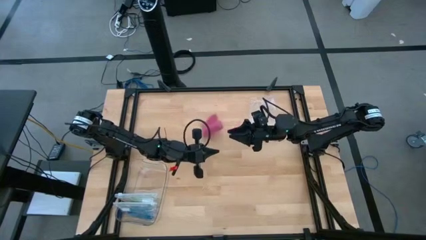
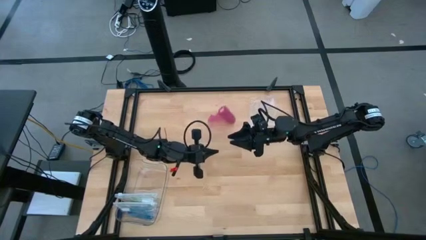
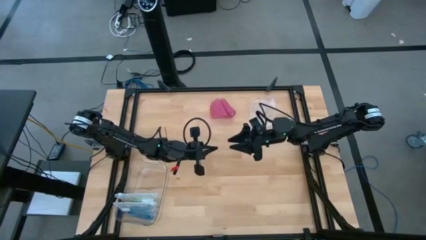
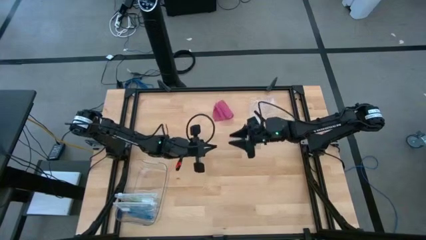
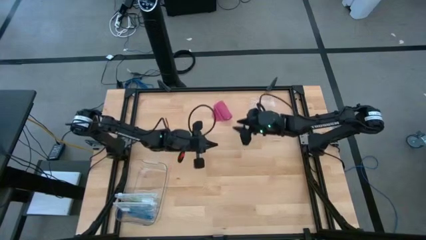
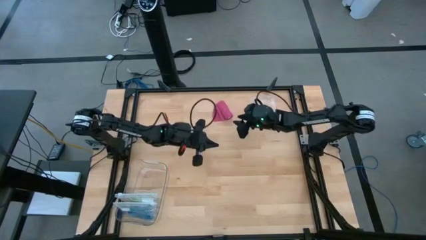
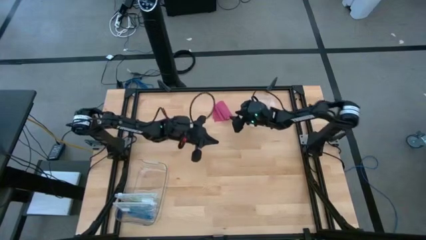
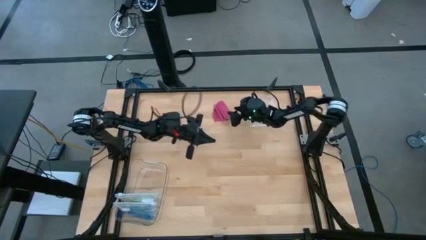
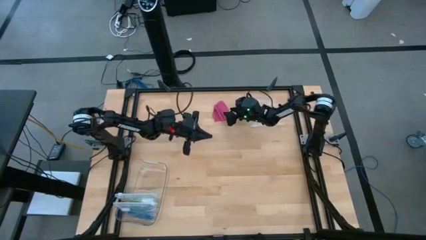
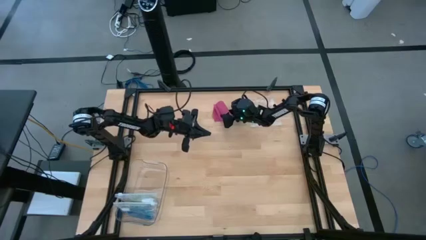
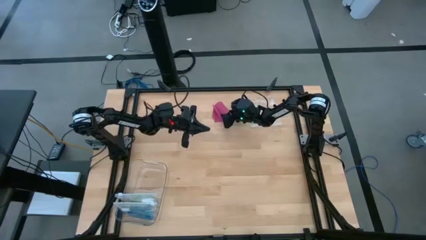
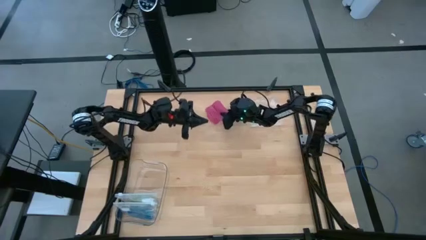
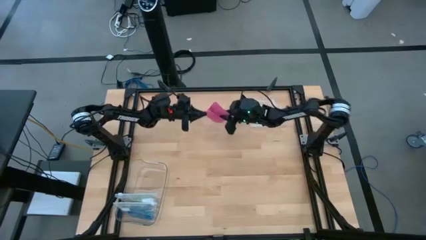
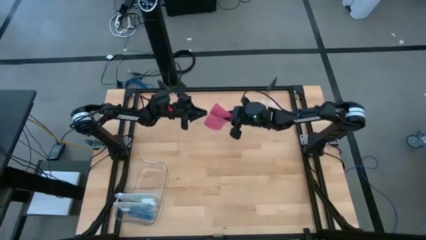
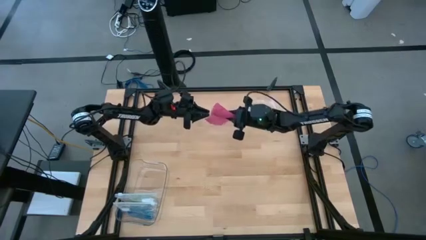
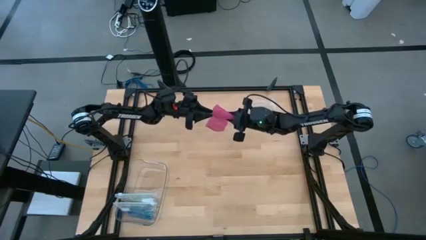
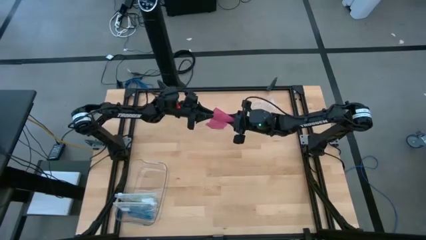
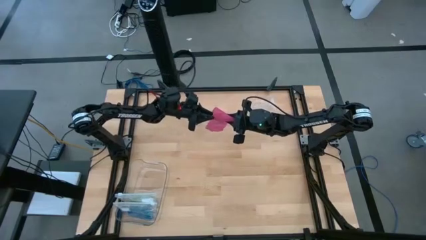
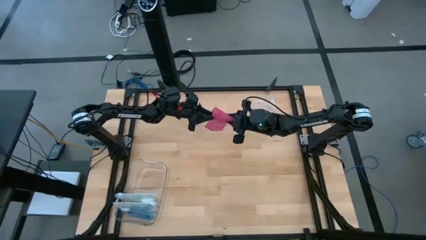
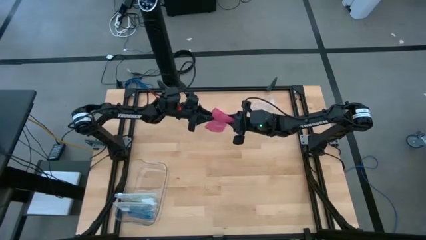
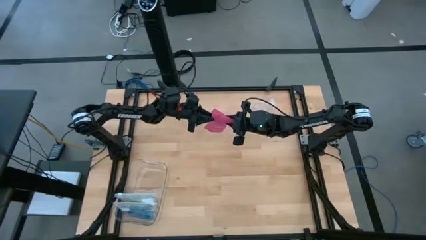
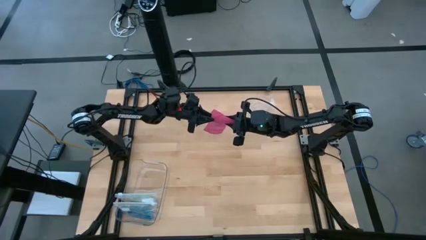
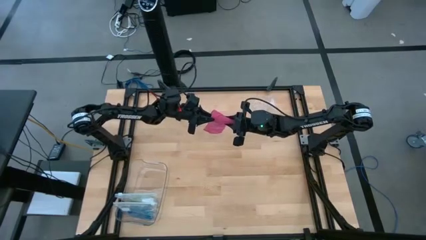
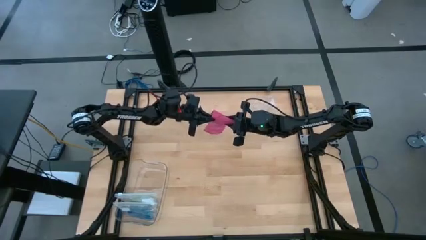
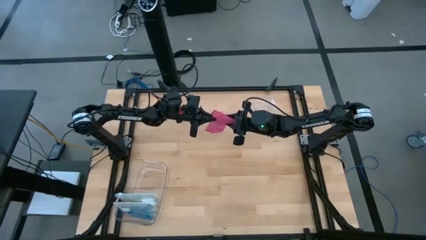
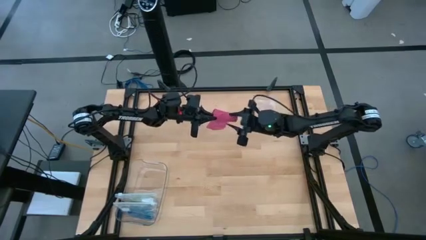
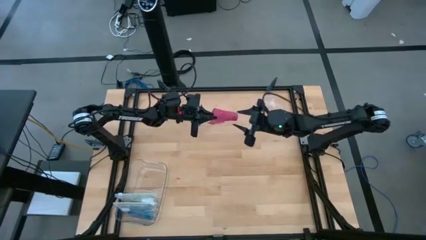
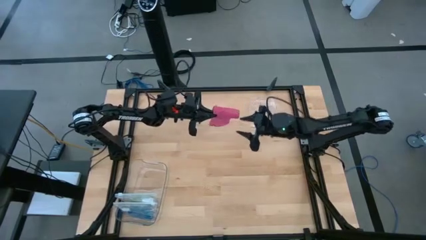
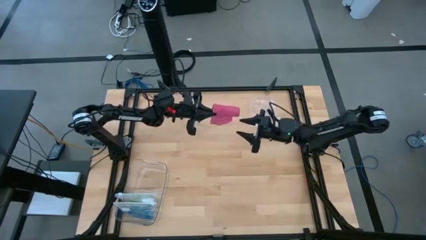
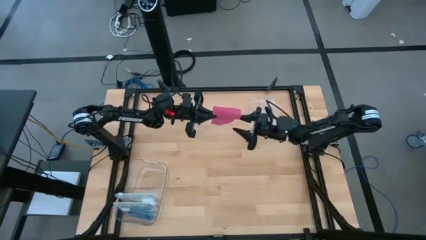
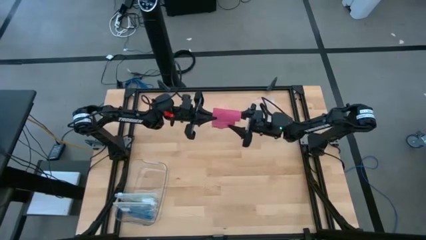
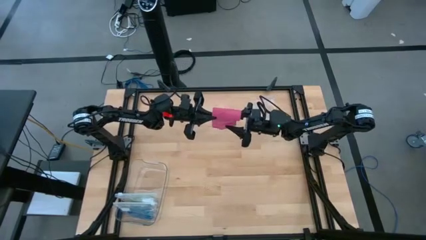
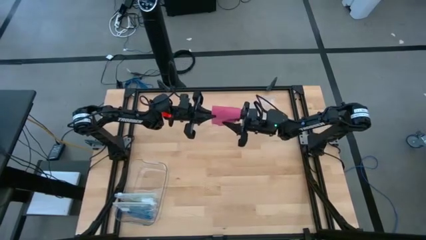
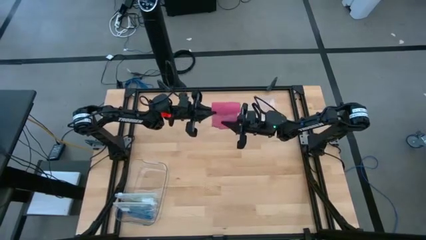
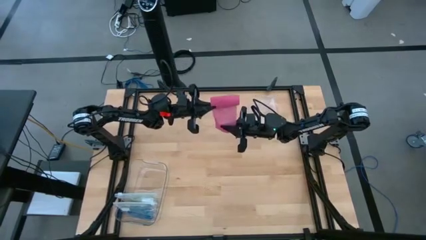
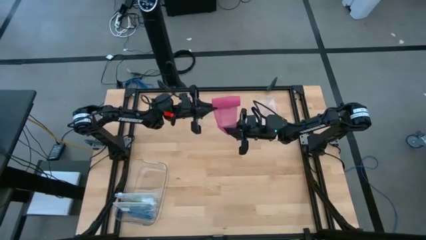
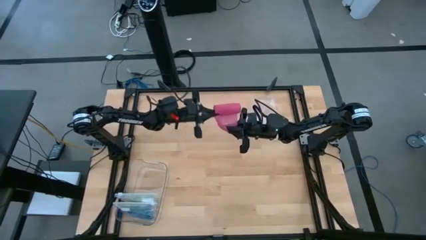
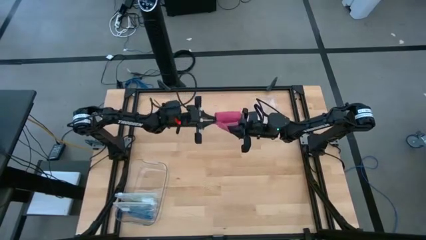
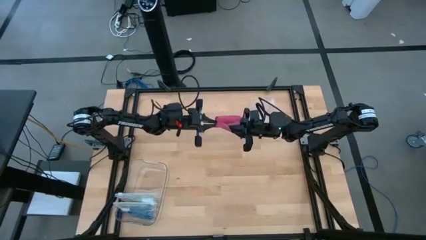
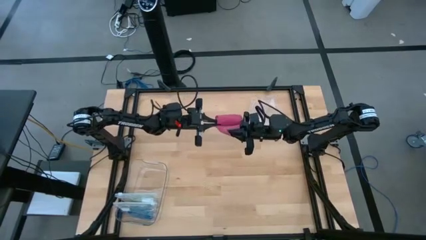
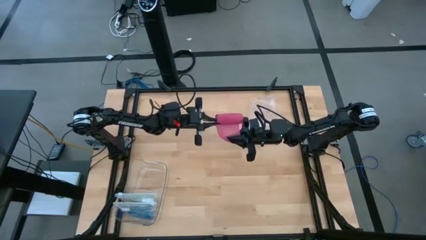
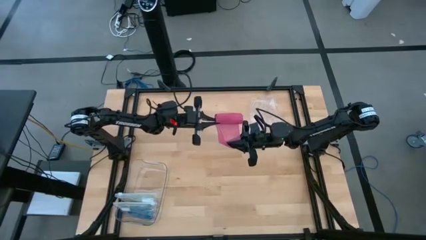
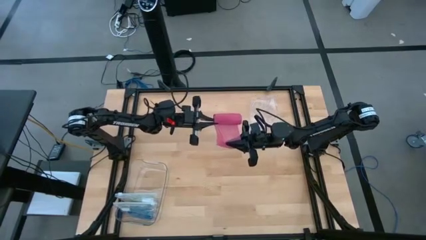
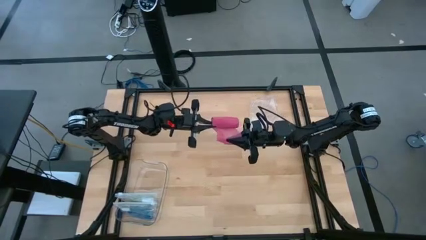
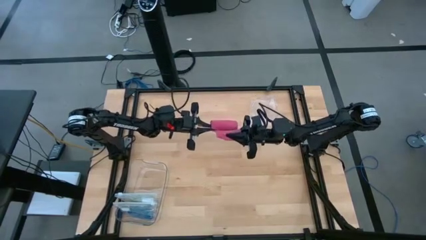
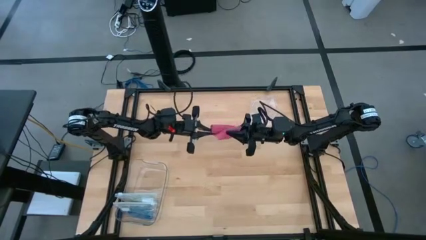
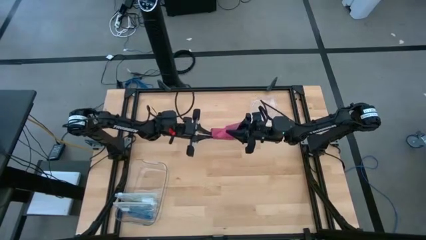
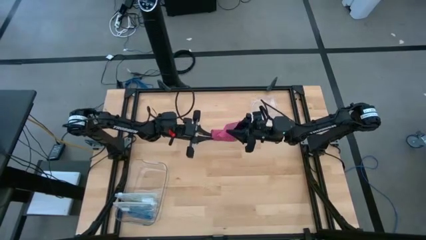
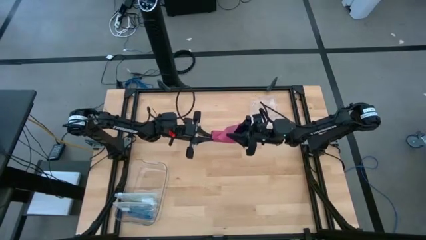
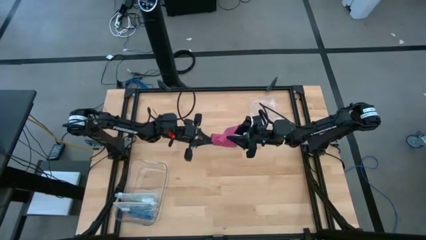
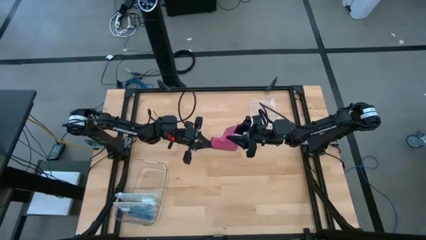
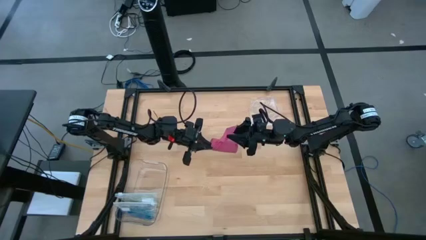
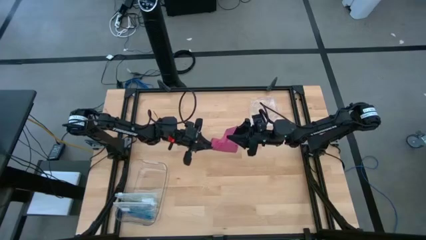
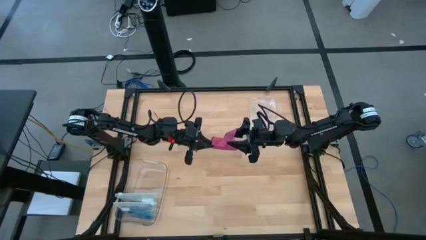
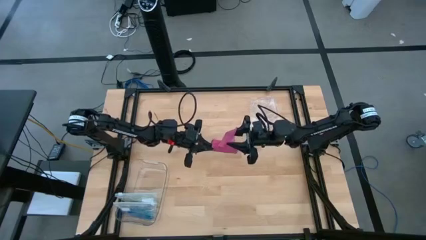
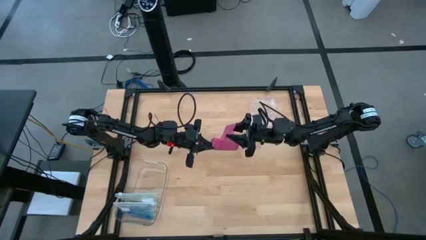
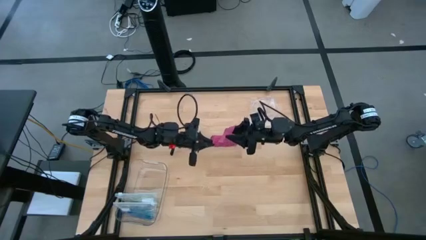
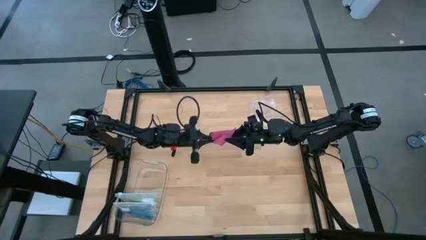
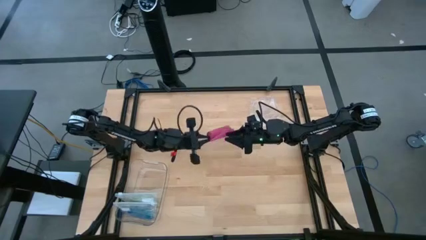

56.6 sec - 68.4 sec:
Task: Roll bandage
Roll the pink bandage

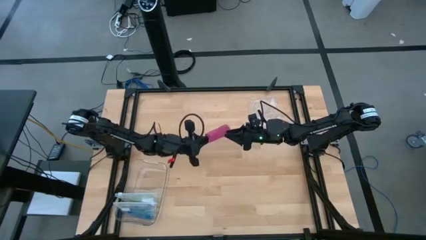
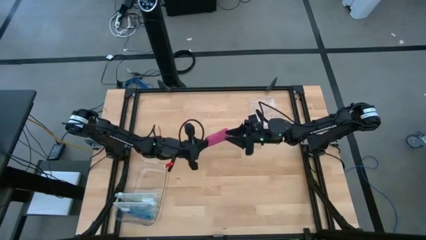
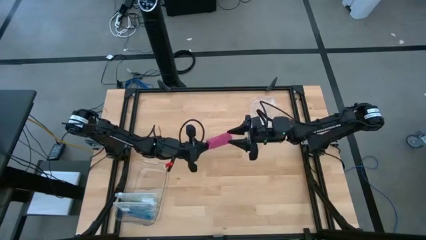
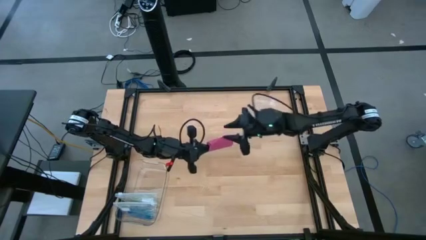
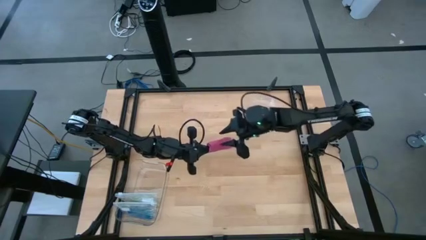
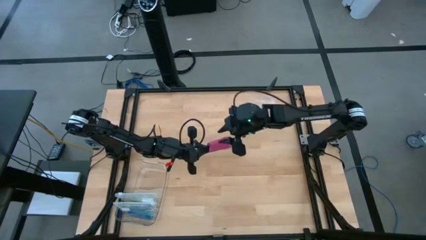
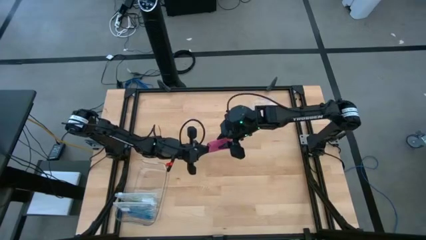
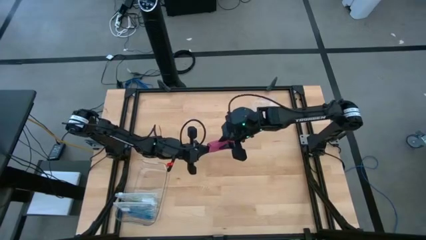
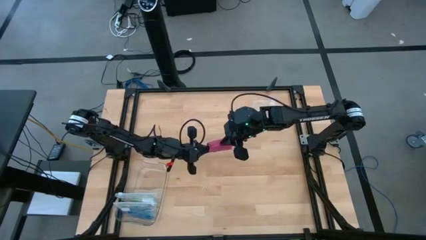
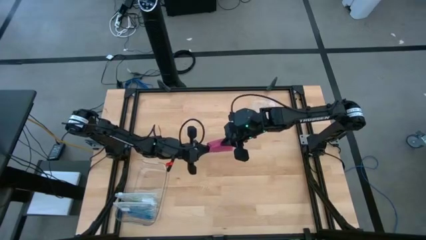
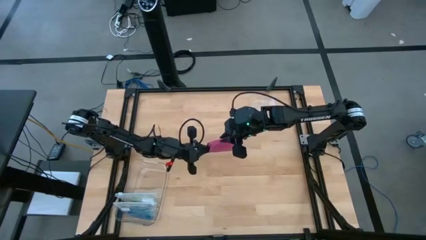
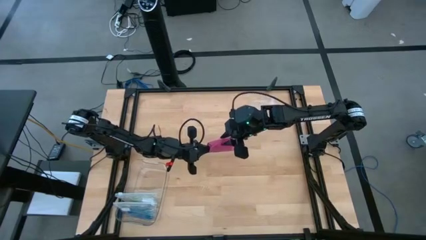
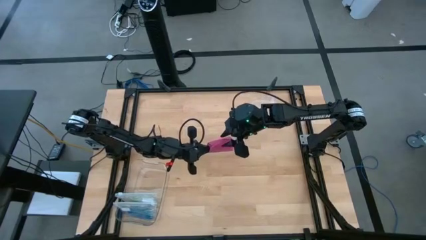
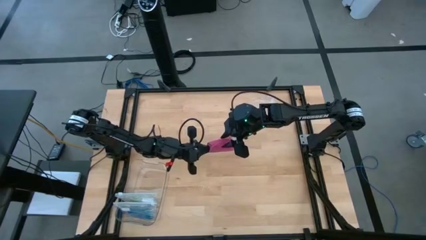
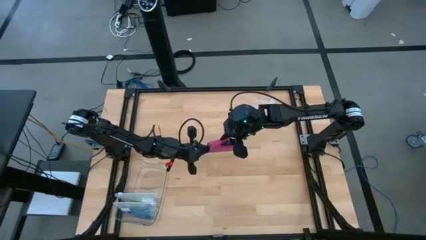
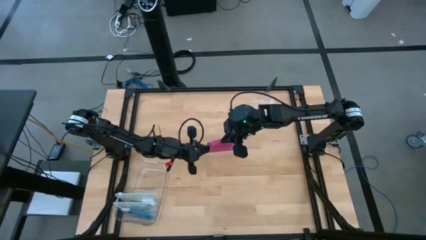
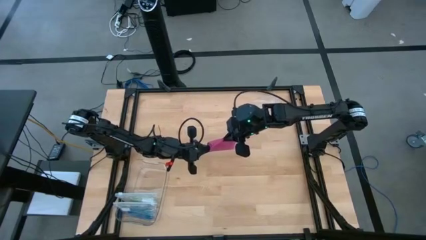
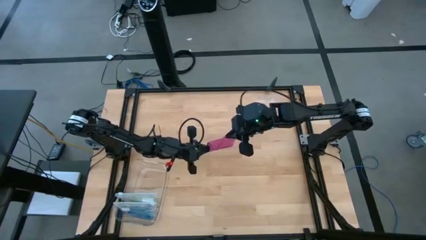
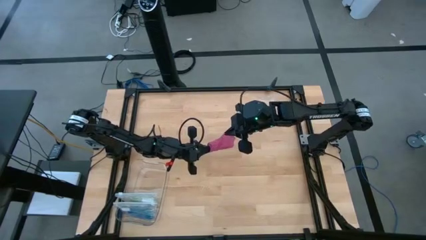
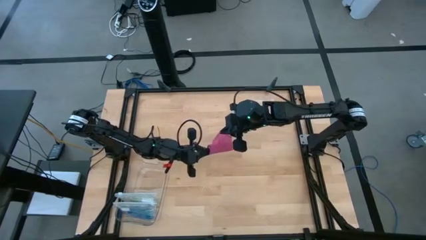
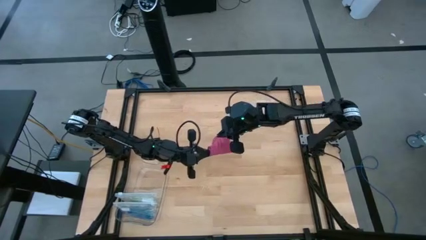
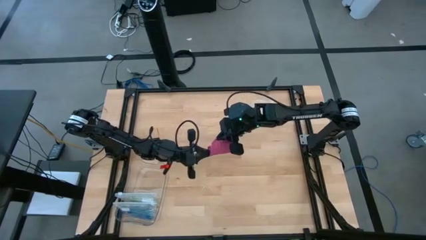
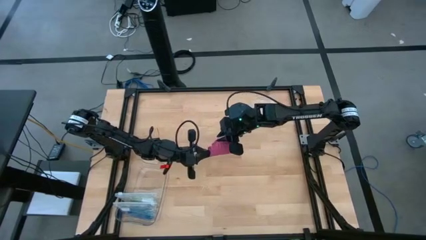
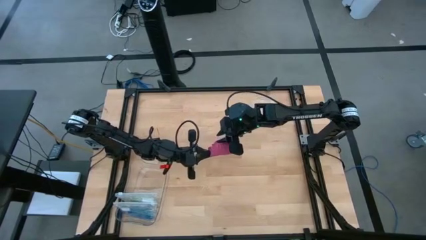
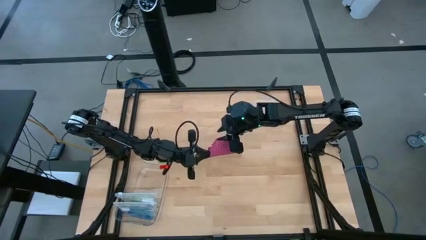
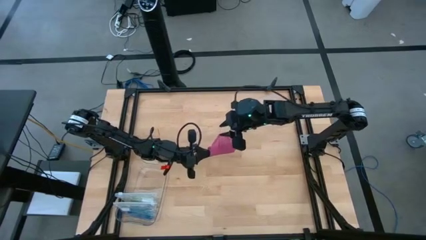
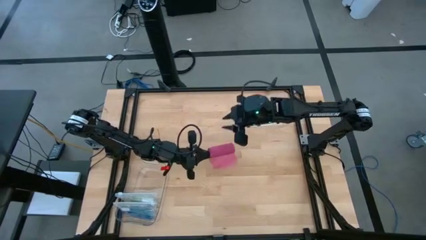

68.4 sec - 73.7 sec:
Roll the pink bandage
